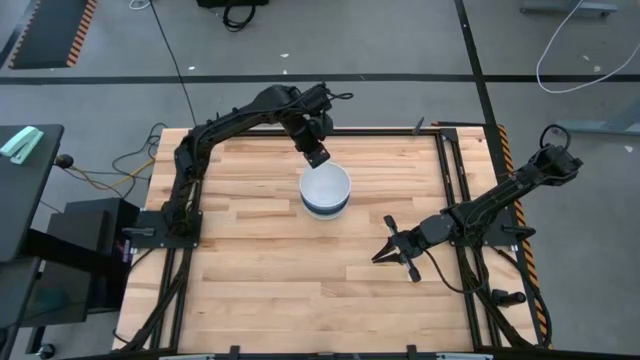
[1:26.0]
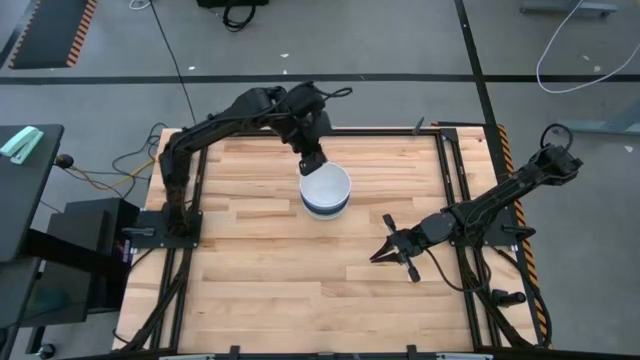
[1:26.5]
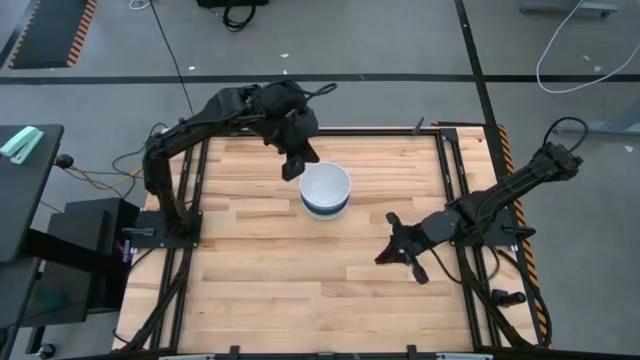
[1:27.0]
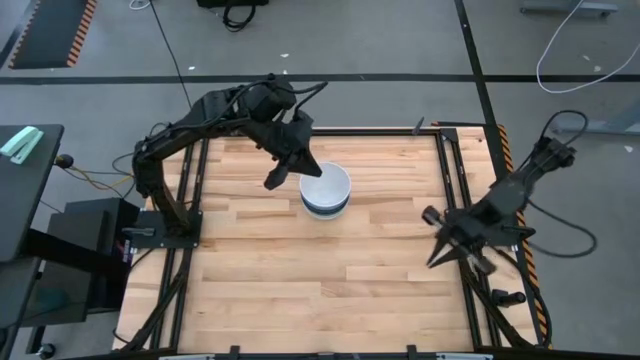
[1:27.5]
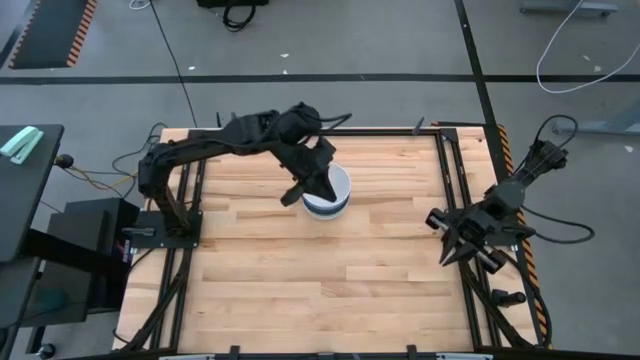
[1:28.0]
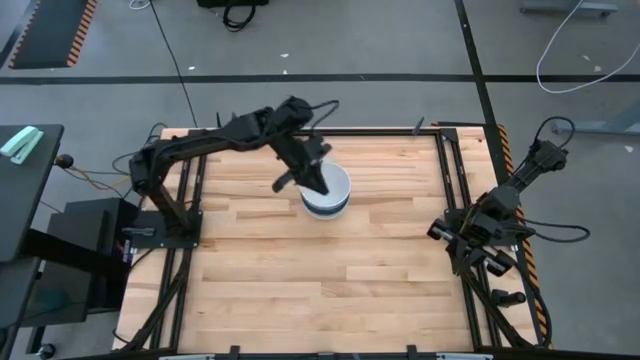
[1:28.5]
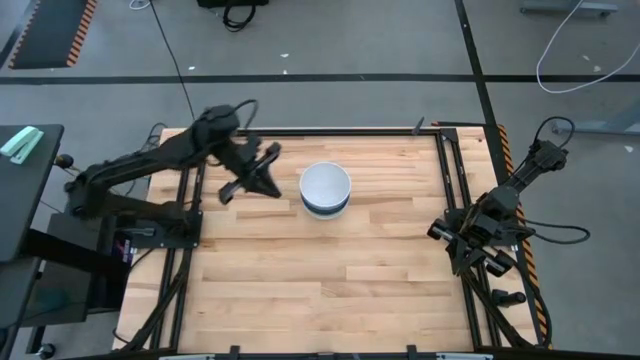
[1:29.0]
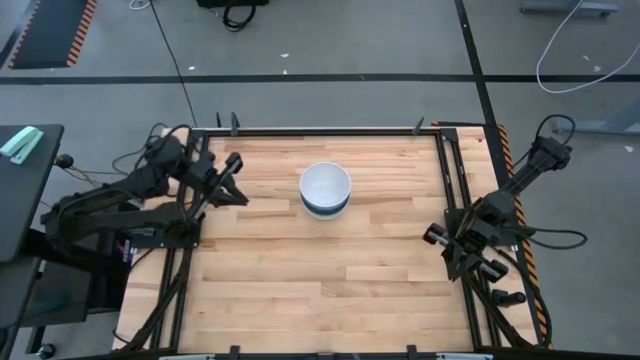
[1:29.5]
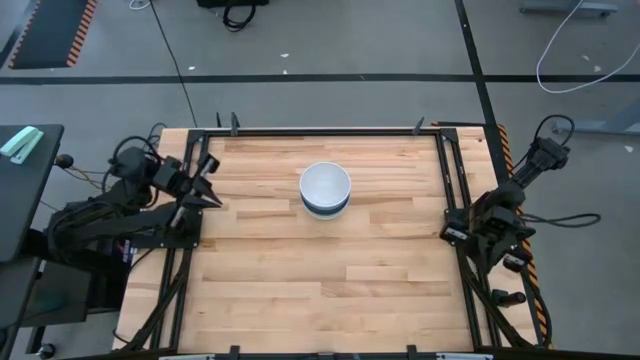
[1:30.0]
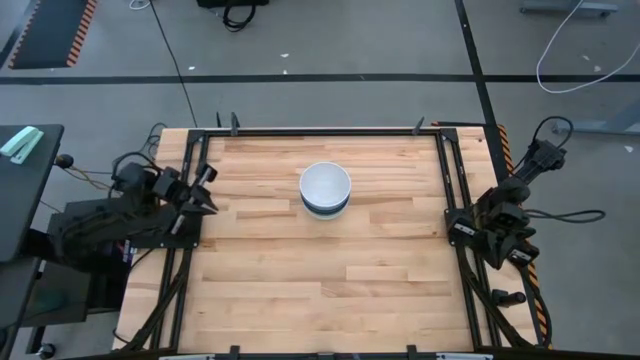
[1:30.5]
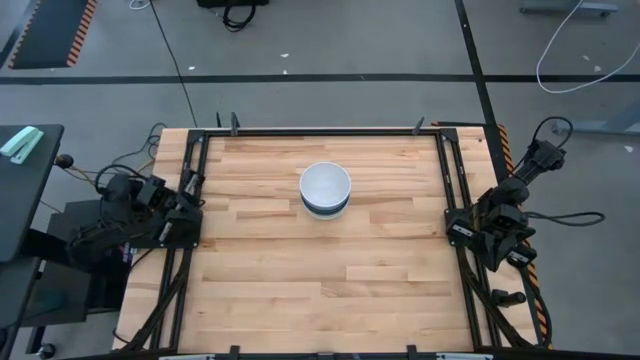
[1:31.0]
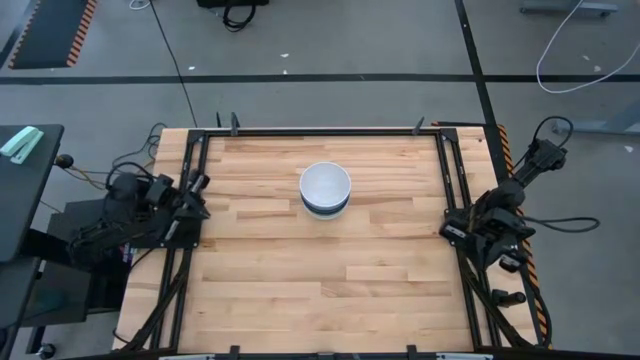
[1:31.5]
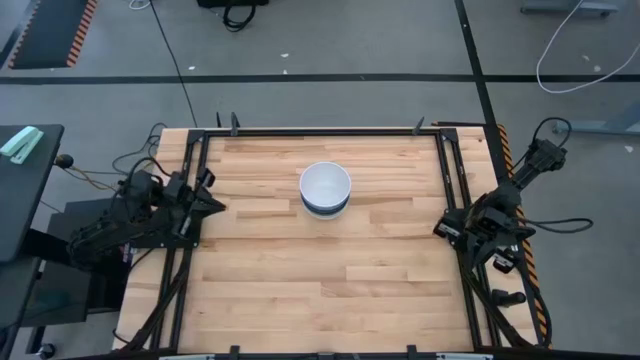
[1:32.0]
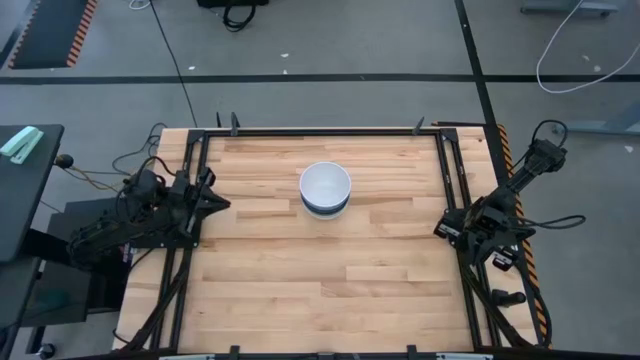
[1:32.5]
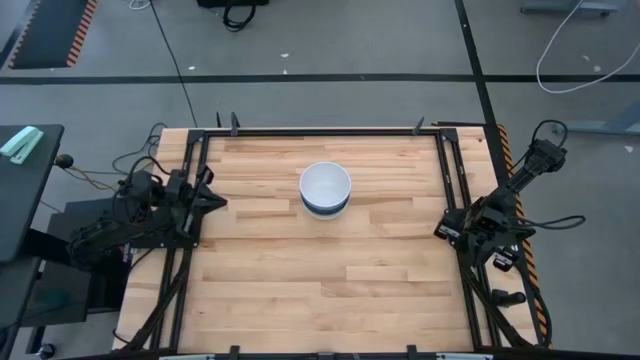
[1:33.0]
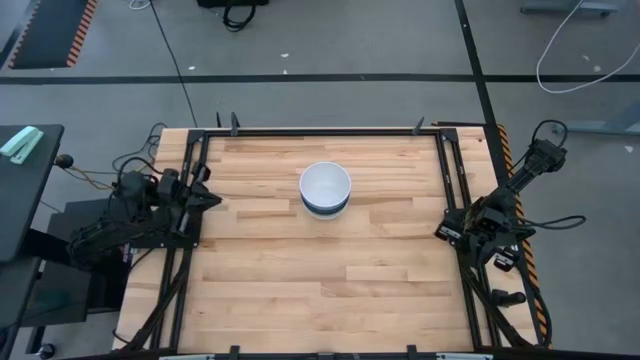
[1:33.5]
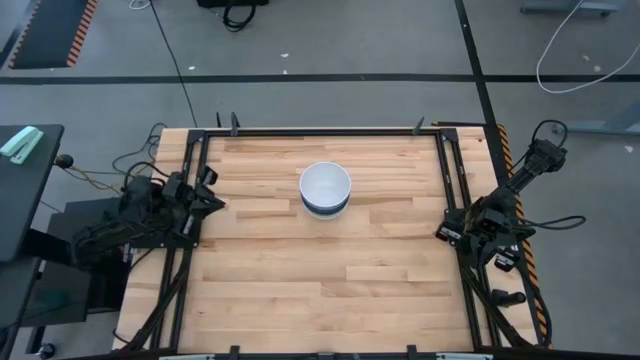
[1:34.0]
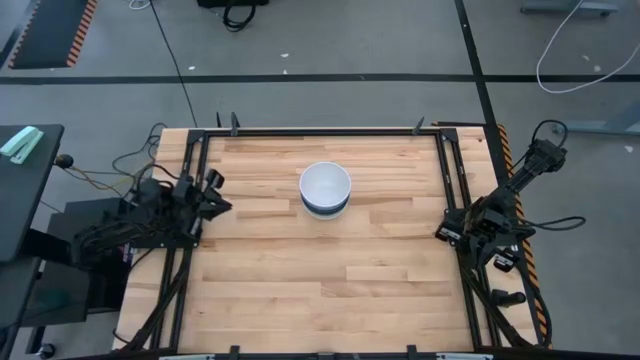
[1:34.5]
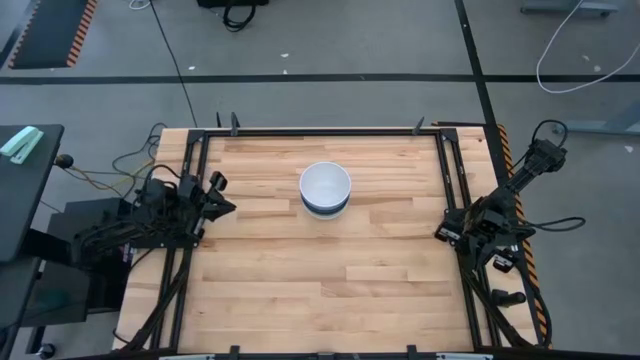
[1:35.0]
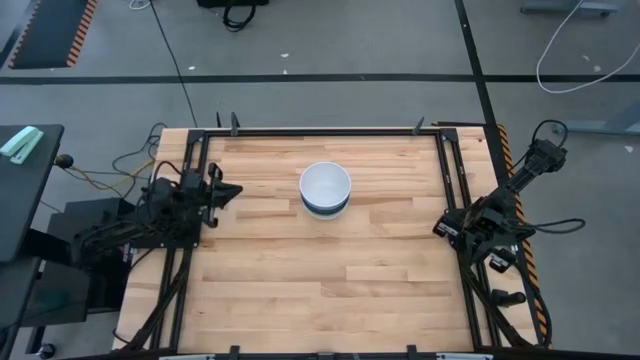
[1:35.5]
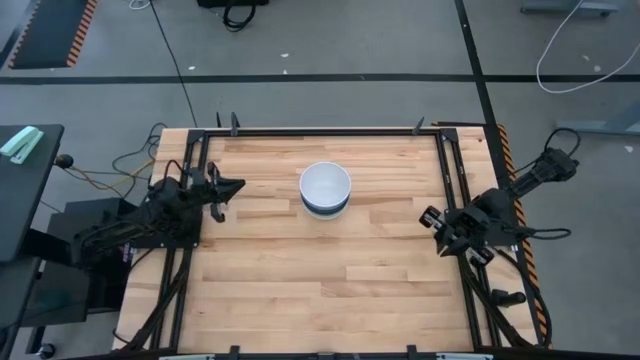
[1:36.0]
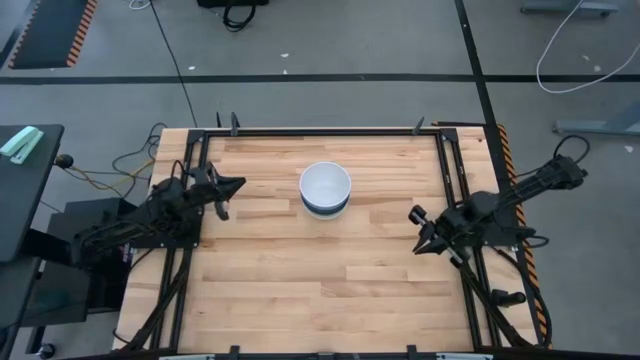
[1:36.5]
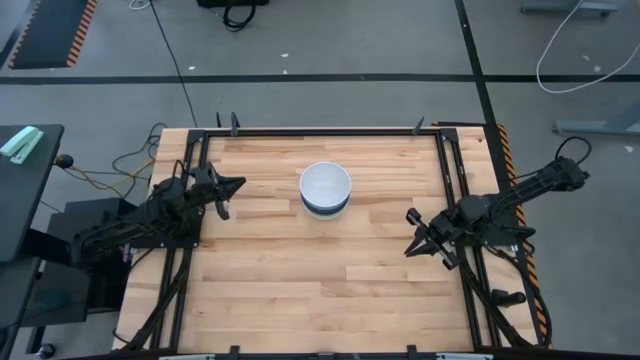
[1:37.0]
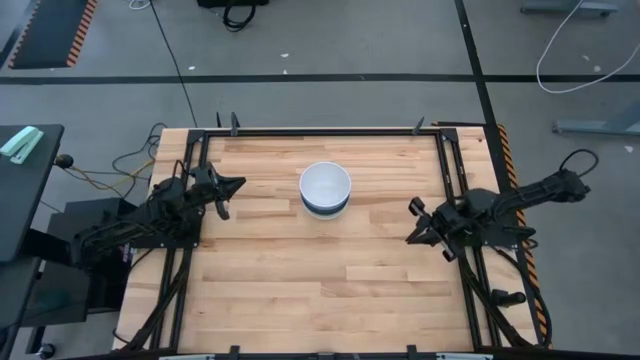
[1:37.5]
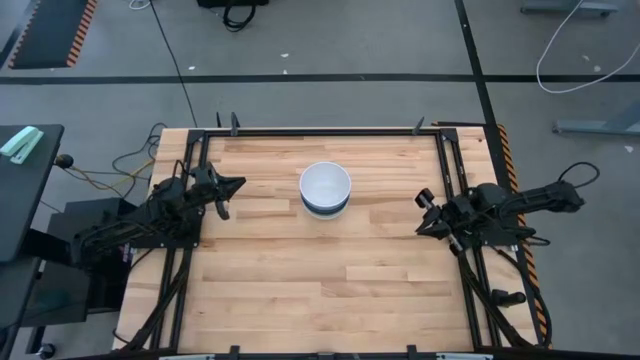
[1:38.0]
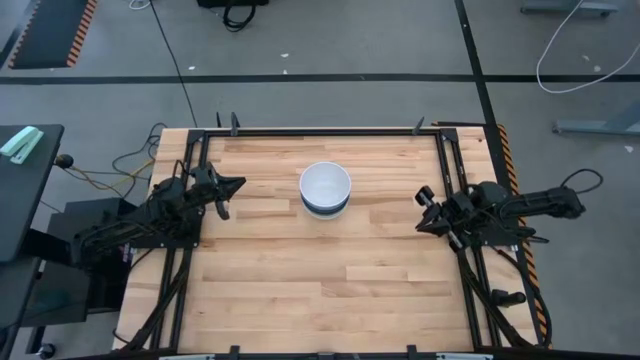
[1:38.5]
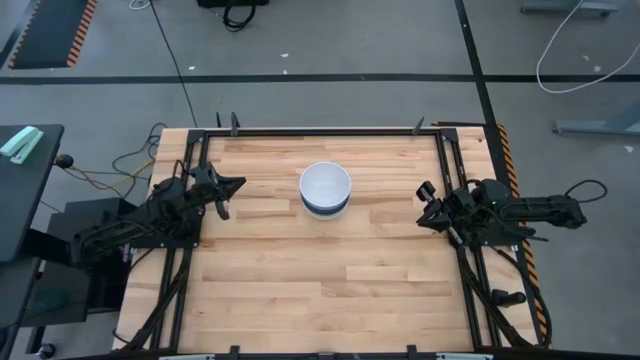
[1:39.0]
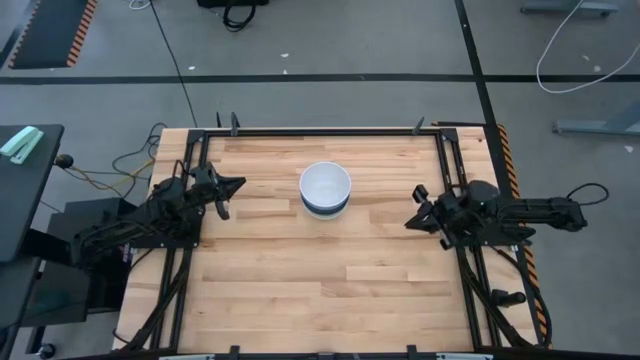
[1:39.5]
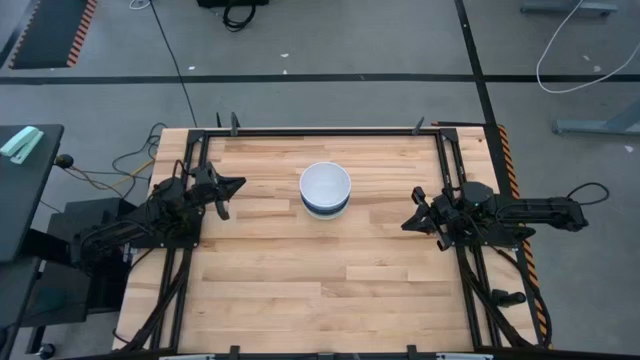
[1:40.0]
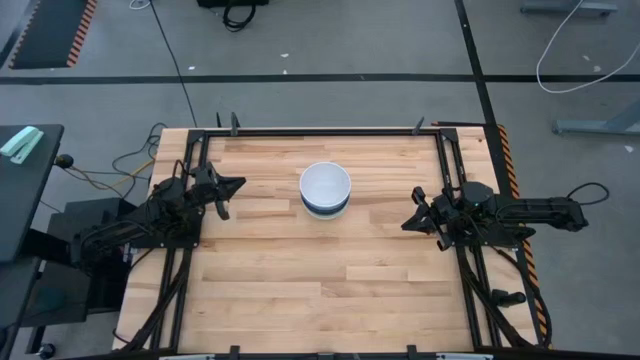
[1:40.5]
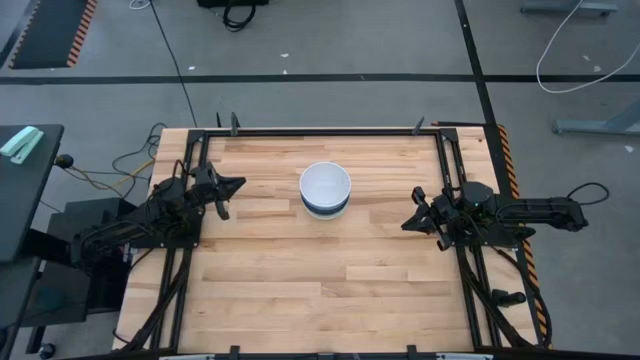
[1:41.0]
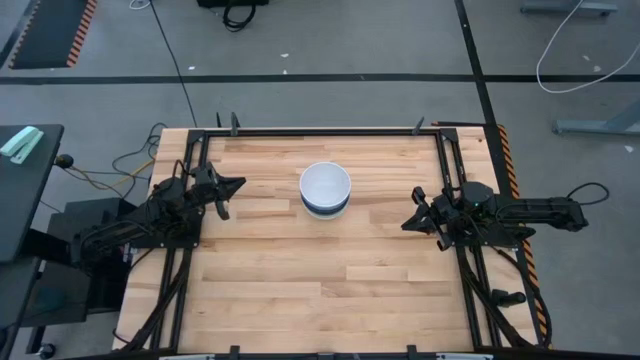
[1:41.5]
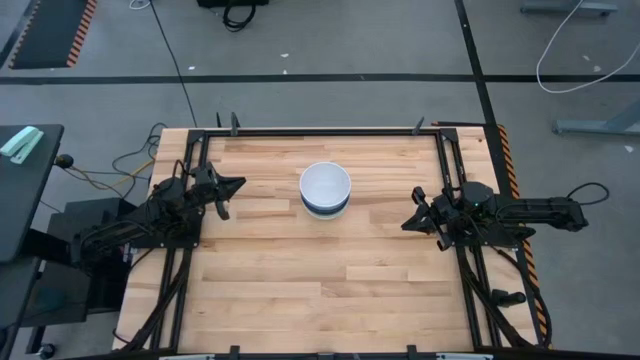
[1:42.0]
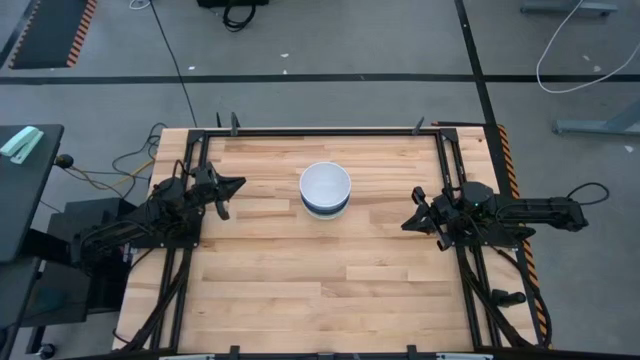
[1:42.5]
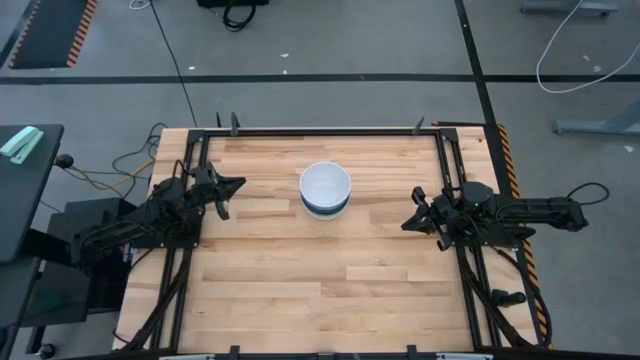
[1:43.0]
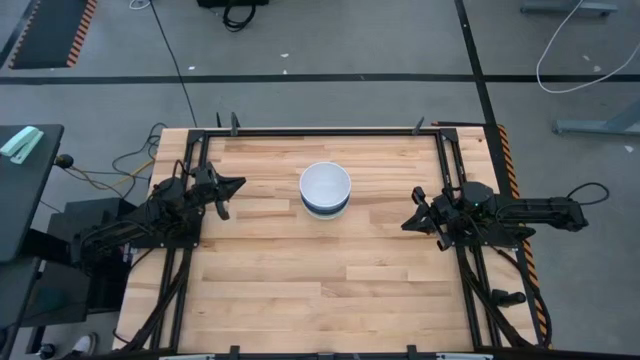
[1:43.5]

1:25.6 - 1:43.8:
Task: Nest bowls inside each other
Return to Home Position

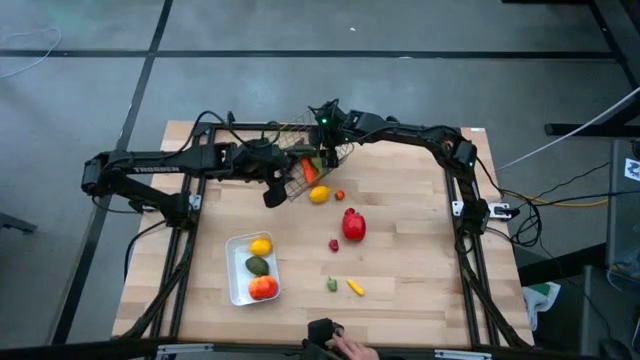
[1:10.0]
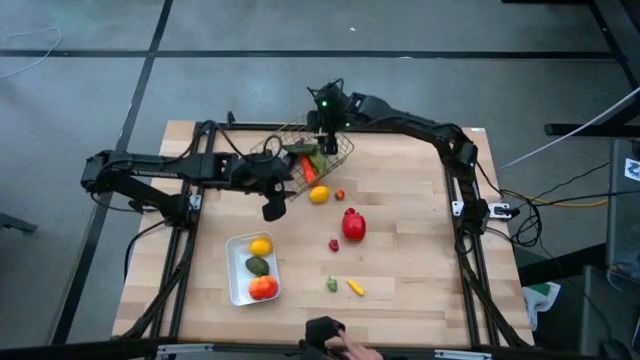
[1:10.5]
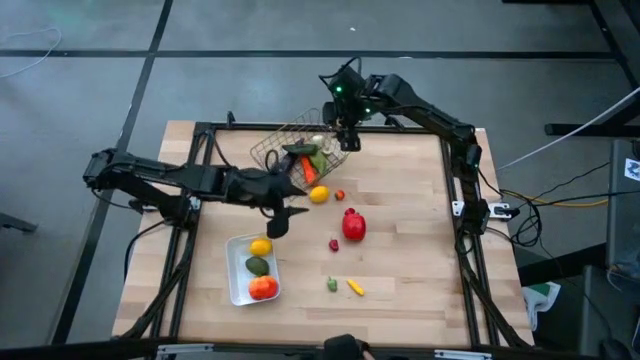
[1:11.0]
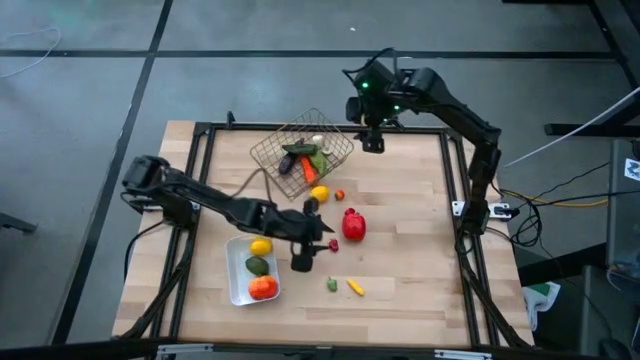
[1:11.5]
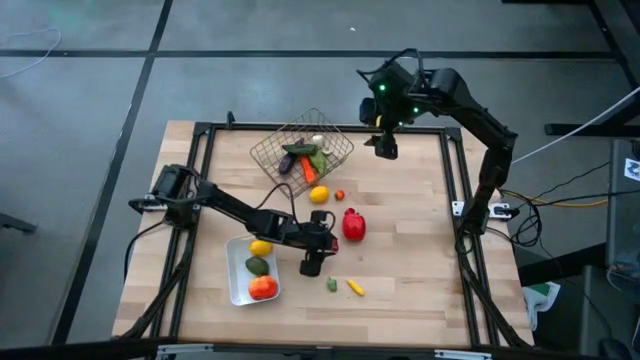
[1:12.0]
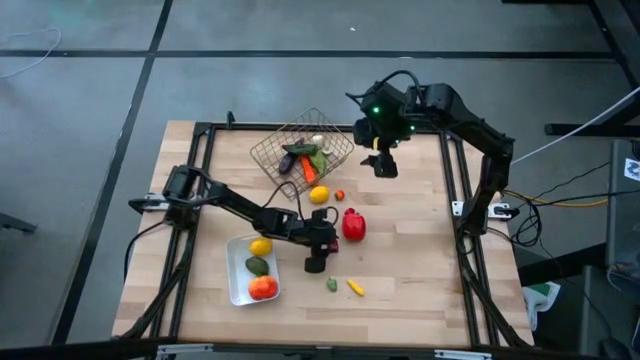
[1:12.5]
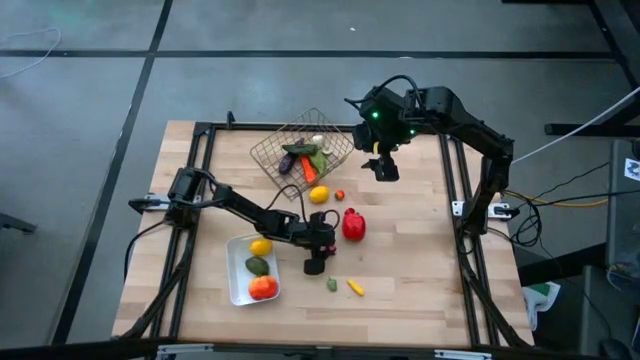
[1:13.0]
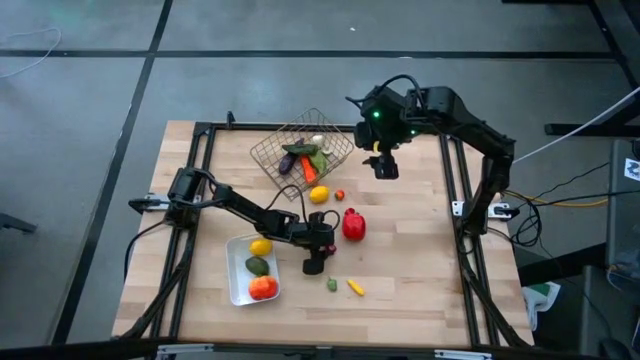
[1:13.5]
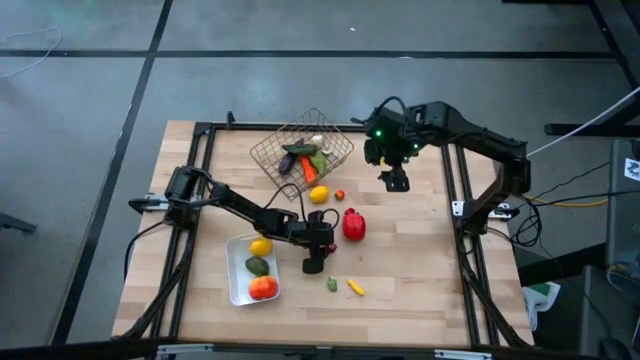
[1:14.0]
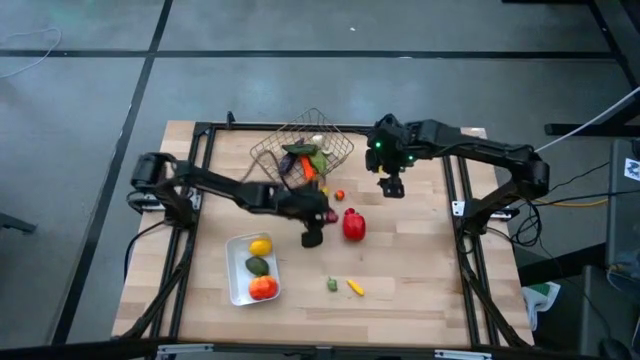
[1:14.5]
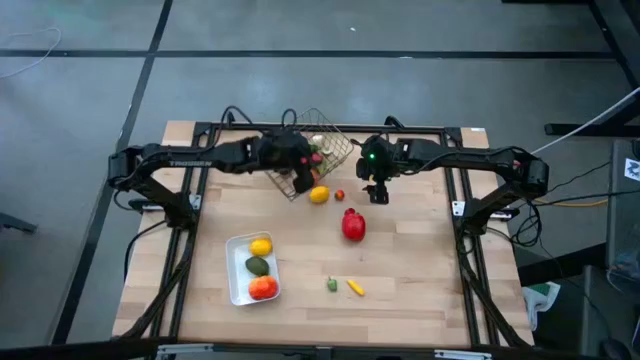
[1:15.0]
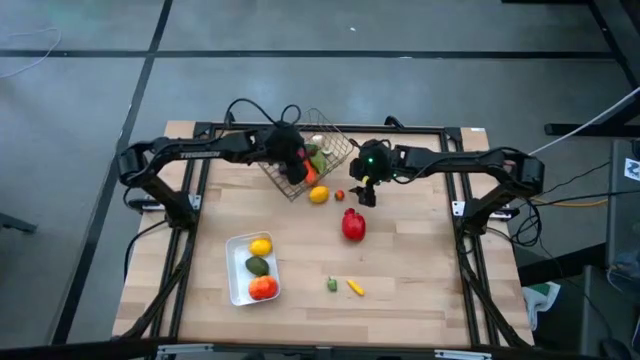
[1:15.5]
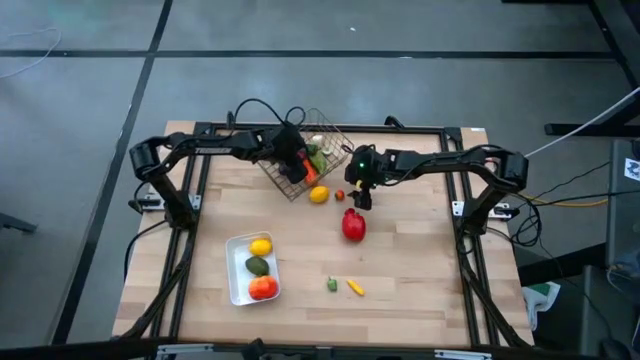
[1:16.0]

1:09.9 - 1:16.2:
Task: Sort produce into baskets
Put the bottom small red bell pepper into the gold wire basket
